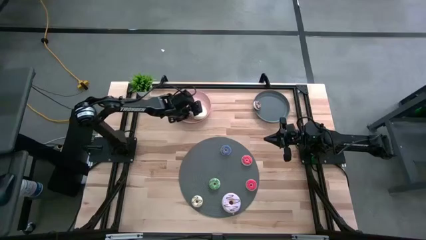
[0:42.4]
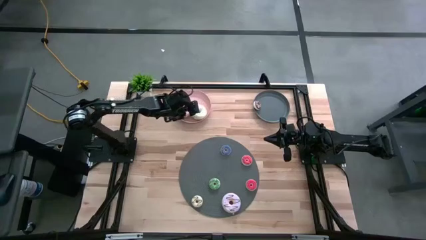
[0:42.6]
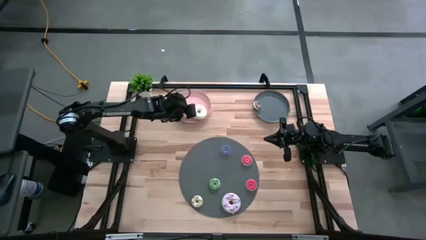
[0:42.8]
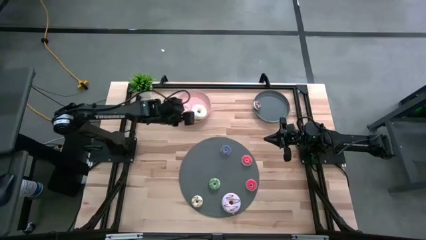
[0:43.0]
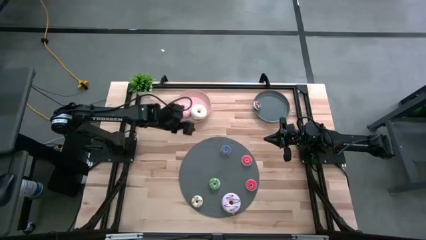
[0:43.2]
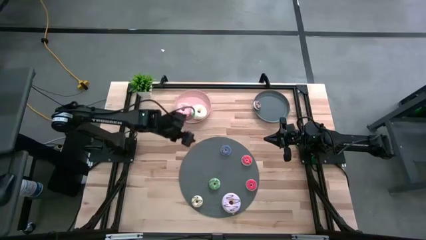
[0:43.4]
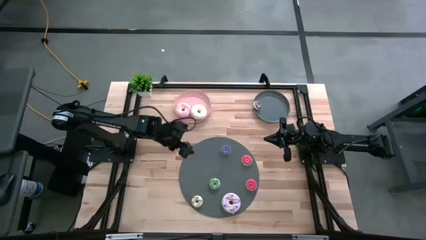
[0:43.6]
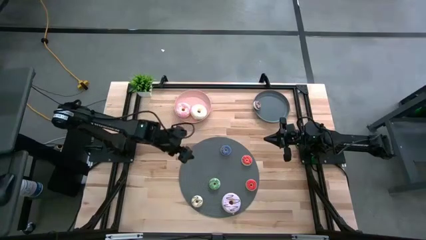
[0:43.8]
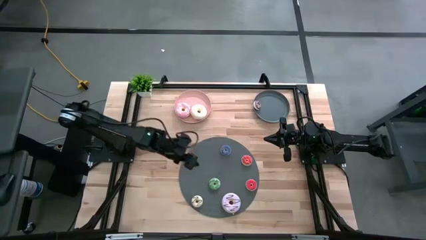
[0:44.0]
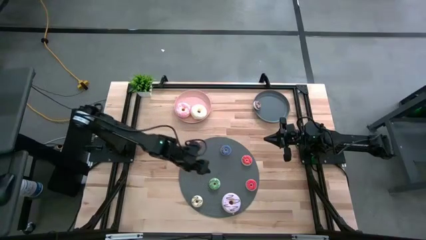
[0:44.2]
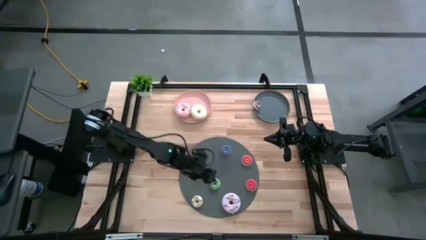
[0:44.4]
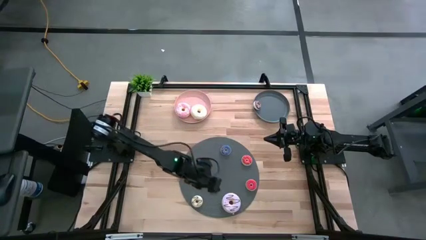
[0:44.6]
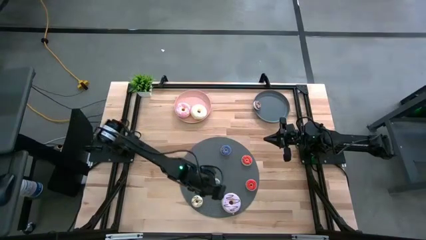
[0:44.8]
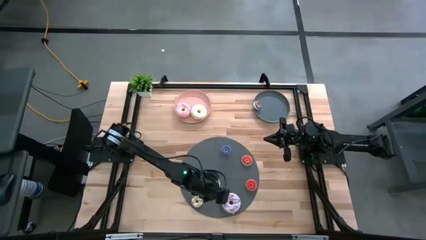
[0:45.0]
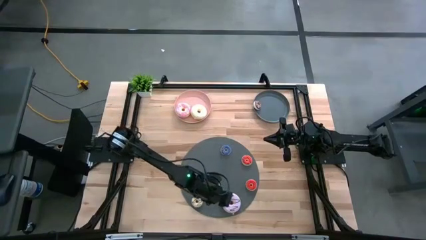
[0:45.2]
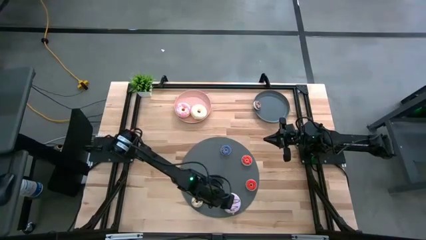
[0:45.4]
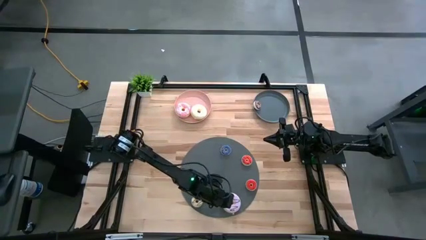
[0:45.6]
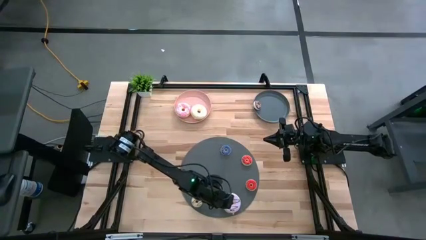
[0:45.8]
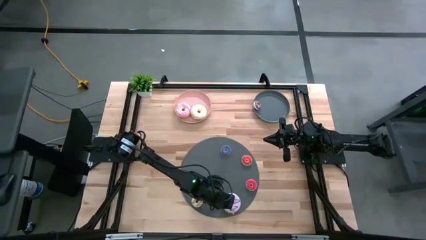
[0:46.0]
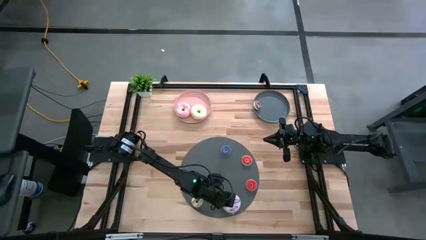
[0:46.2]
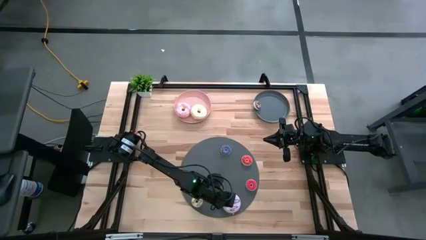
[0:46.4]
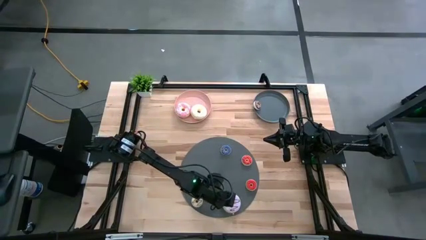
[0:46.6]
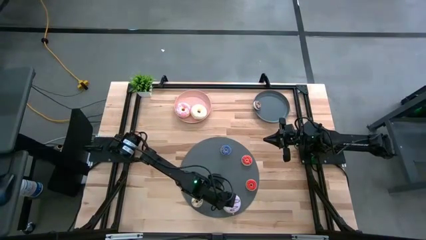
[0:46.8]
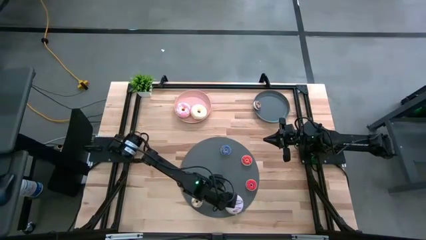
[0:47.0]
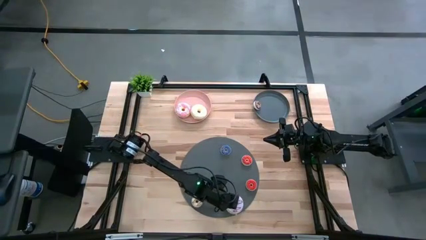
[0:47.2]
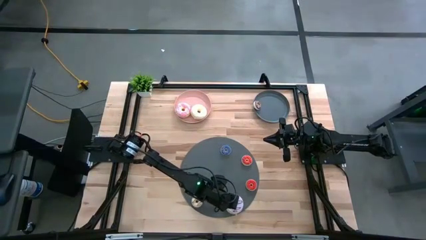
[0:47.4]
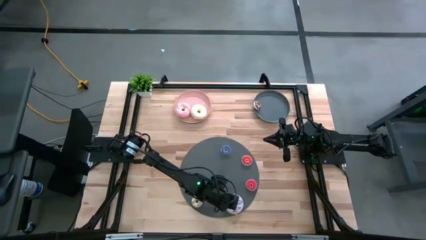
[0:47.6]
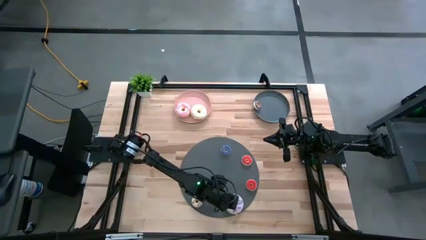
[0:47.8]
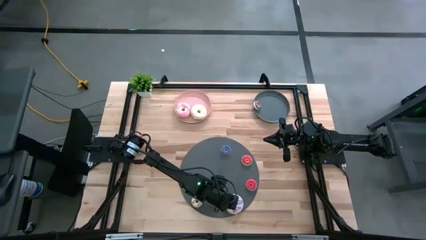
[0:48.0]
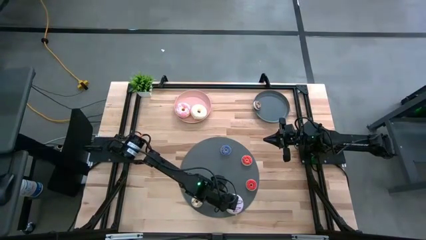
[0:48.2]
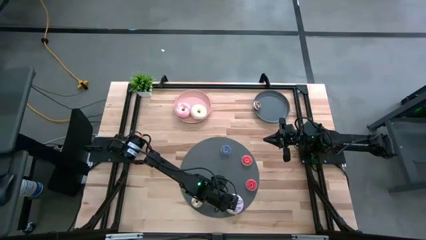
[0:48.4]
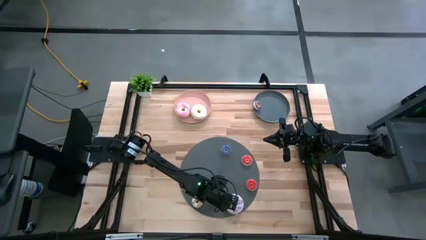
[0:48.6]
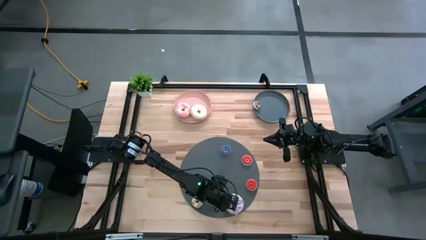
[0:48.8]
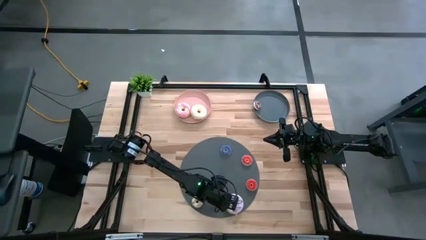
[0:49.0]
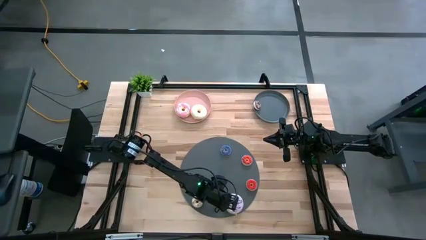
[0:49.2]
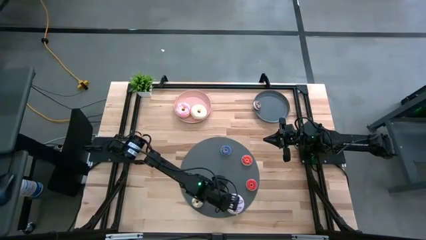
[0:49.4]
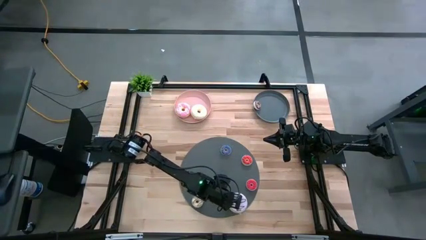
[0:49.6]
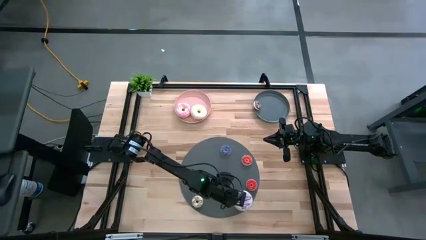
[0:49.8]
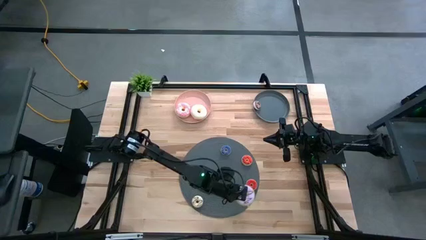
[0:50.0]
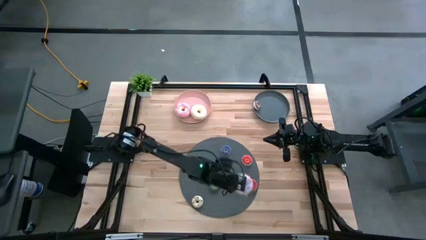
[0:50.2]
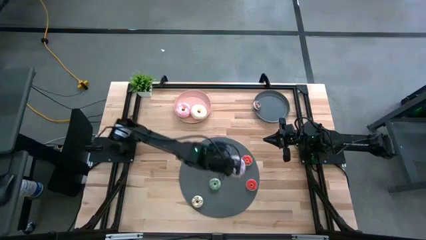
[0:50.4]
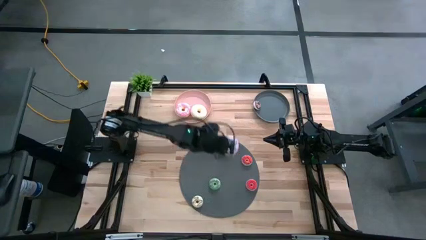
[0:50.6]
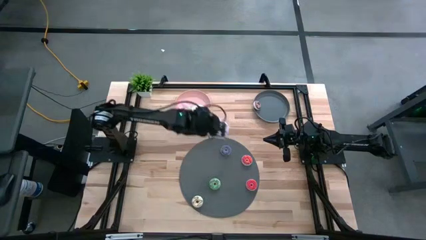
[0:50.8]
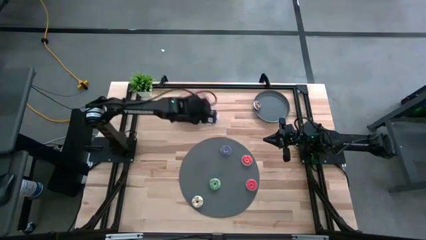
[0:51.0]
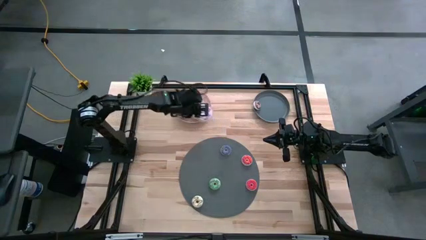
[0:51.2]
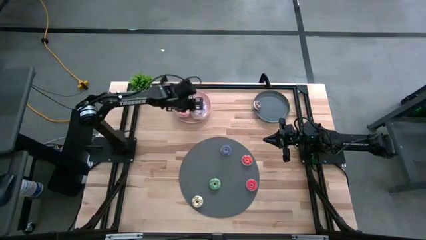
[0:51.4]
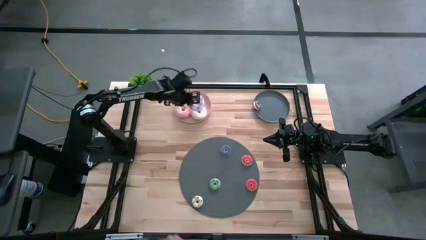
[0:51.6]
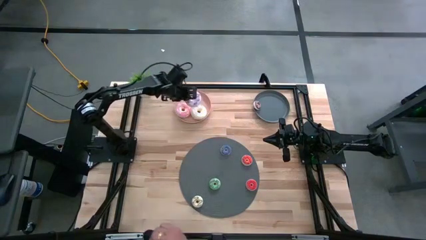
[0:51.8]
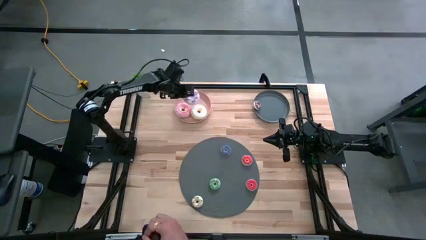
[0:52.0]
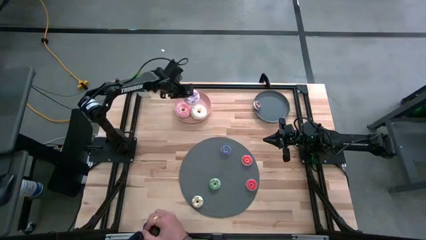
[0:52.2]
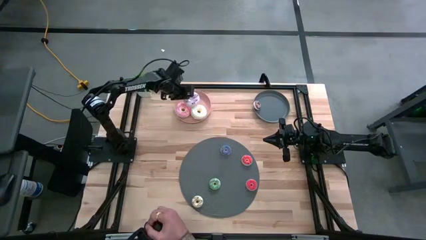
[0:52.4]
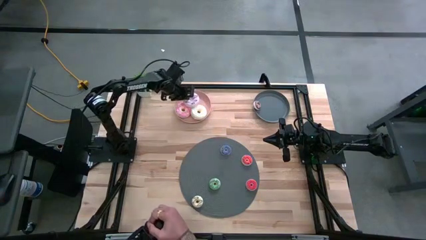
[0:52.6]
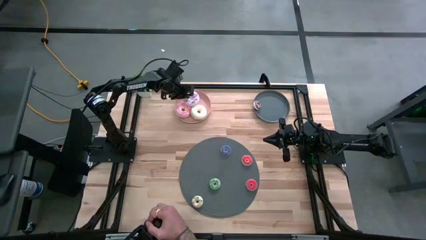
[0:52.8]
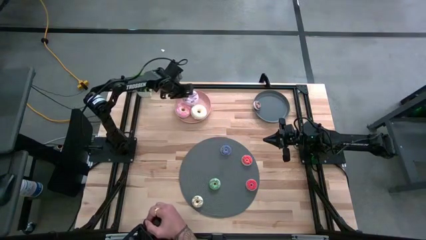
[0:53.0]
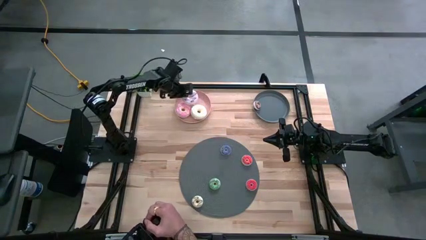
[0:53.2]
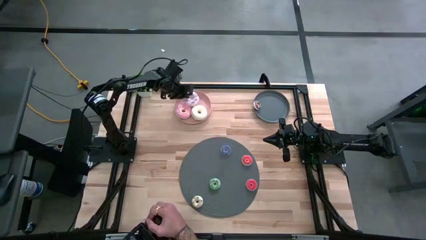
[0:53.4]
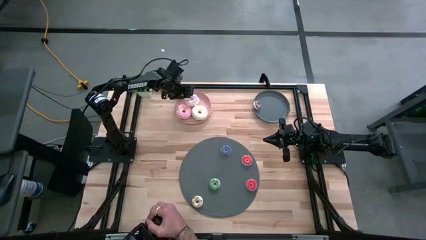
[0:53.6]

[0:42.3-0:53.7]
Task: Pick & Place donuts
Put the large purple donut on the pink plate

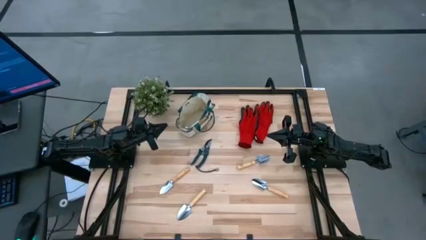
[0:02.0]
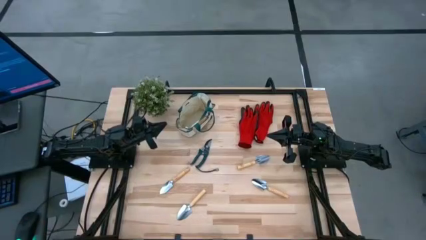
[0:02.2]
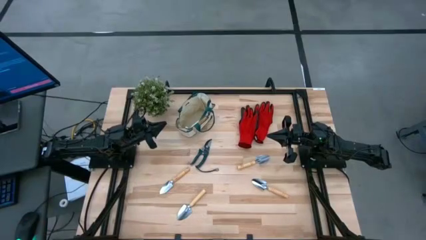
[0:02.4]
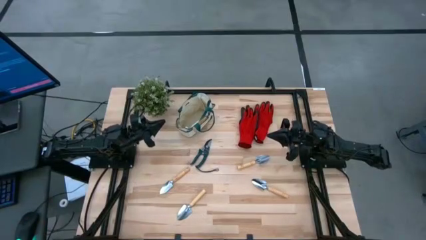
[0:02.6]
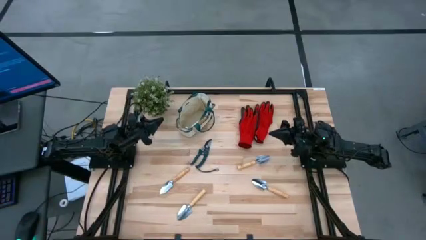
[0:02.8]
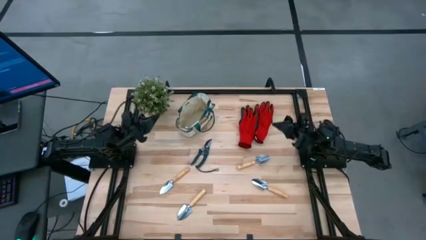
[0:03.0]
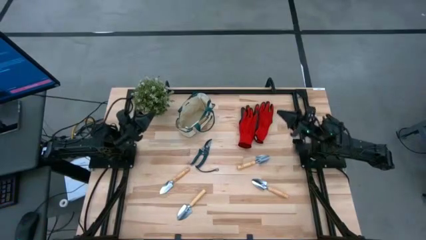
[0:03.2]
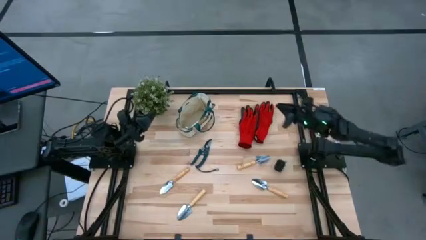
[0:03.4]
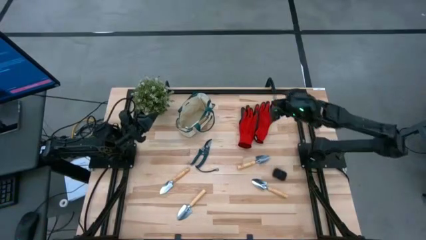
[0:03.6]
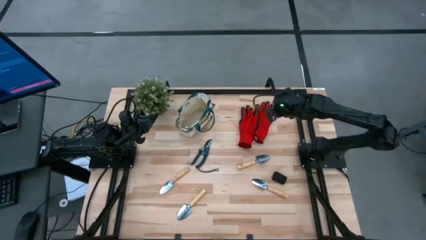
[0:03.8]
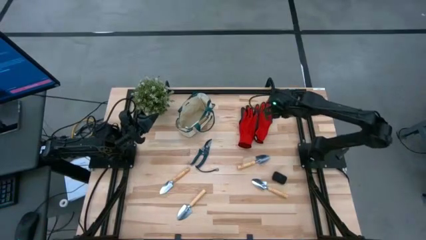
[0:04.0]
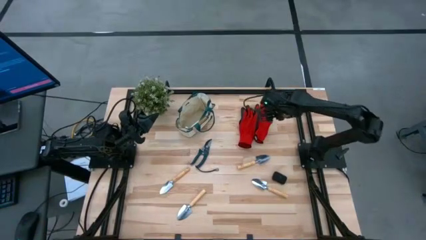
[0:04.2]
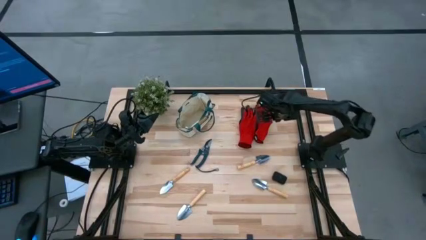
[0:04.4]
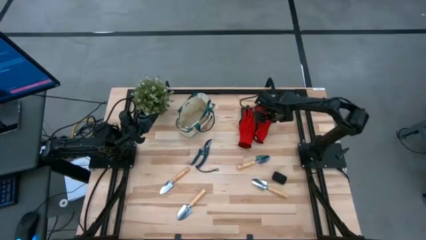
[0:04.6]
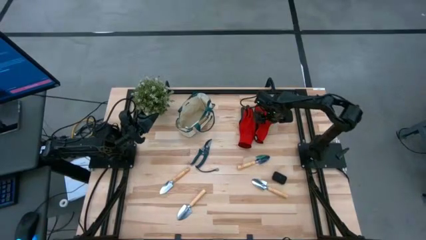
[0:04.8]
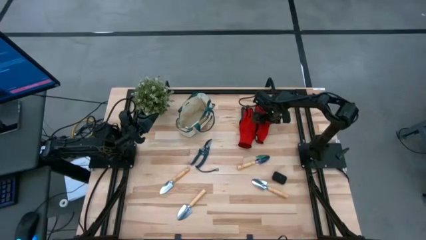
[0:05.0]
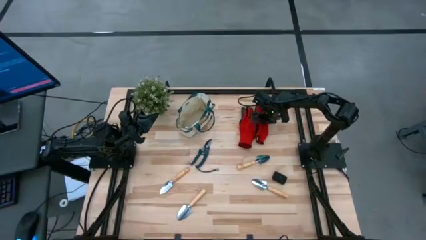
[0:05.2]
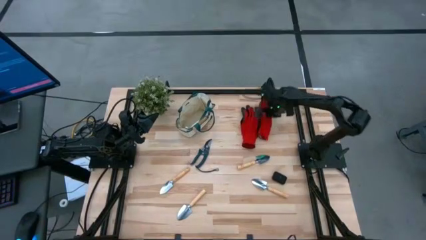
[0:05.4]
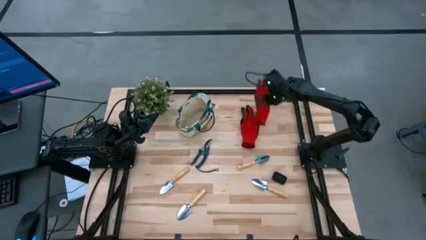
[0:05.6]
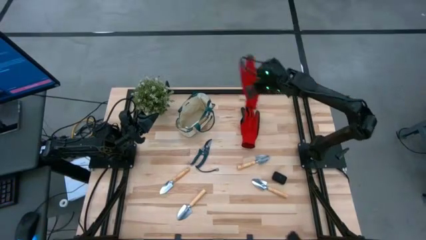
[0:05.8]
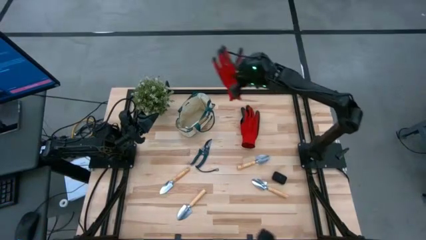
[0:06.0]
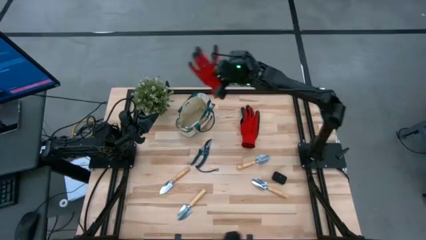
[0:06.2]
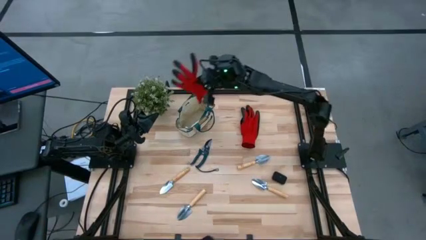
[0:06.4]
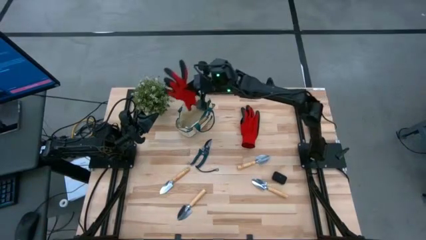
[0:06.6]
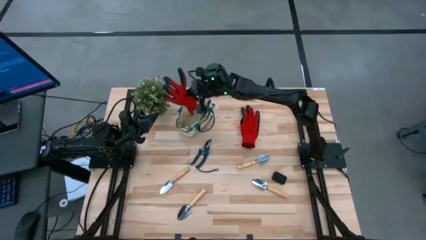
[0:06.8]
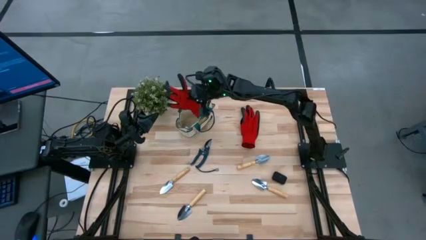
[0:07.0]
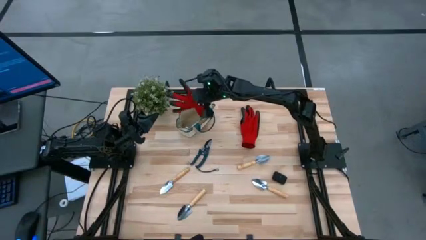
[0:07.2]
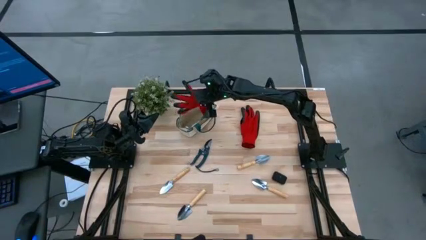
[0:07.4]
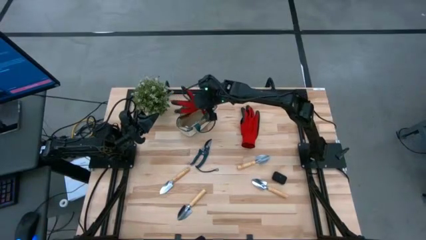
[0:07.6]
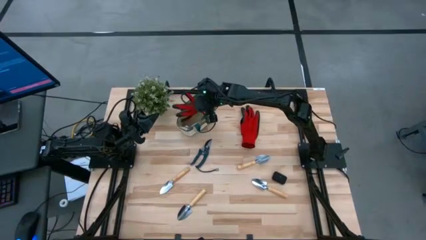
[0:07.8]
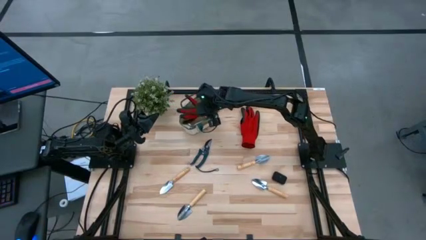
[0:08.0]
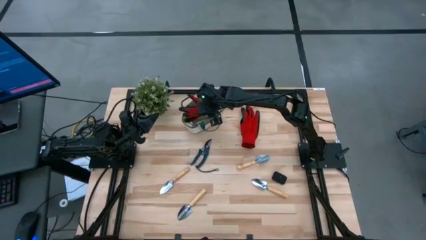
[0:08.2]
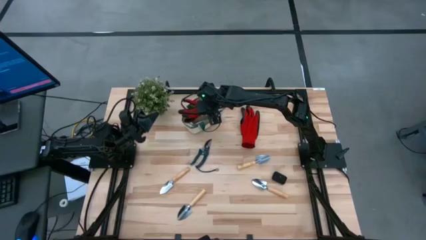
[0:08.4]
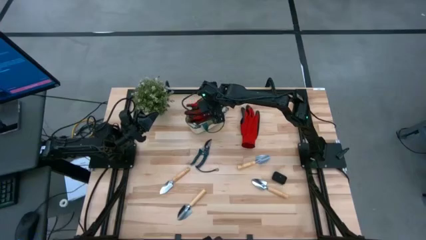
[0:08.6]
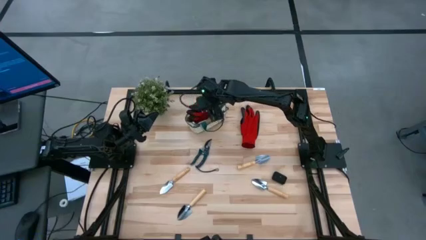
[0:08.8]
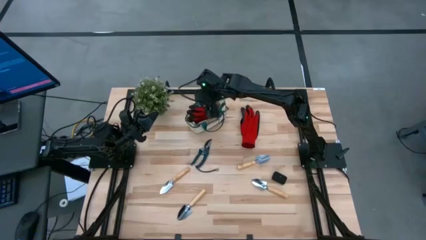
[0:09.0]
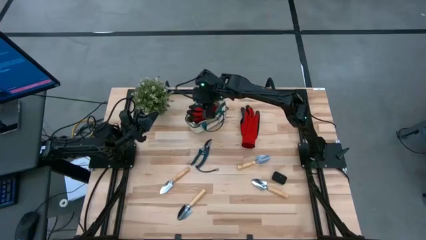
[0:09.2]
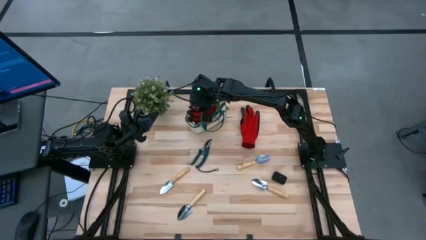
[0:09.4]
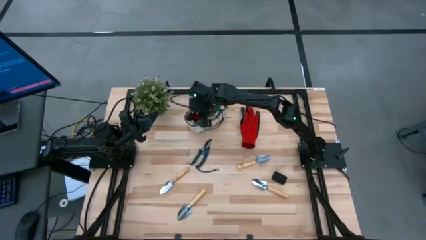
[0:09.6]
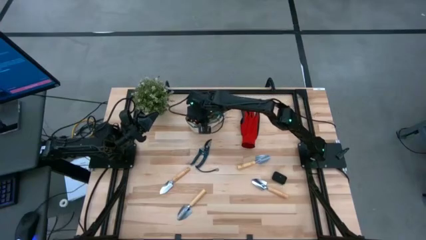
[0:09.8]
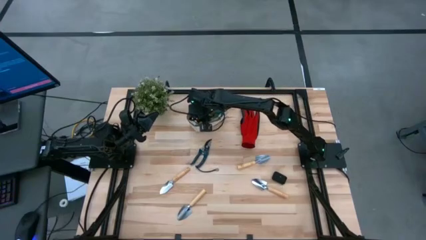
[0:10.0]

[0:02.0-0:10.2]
Task: Pick & Place Garden tools in Gardening bag
Put the red glove into the light brown gardening bag
